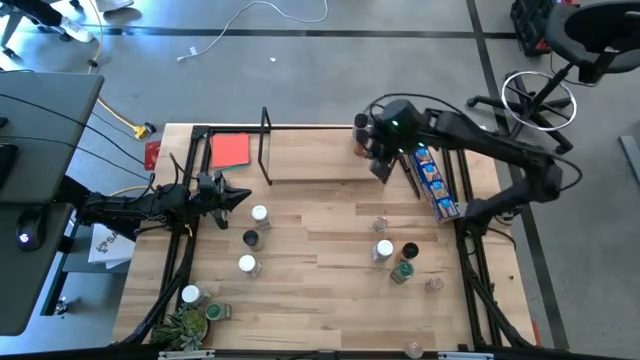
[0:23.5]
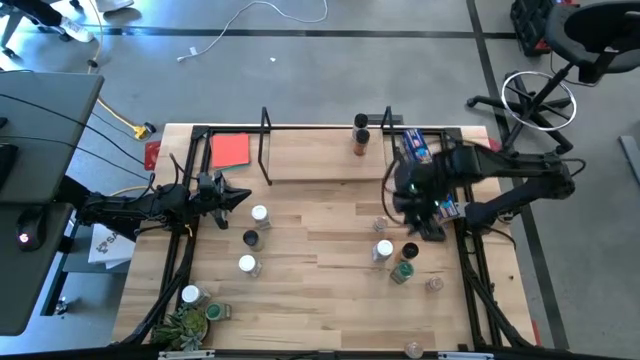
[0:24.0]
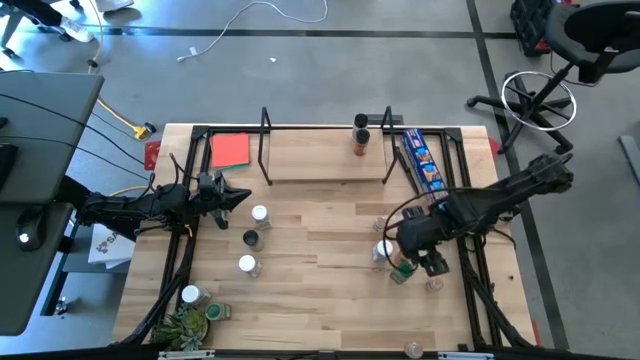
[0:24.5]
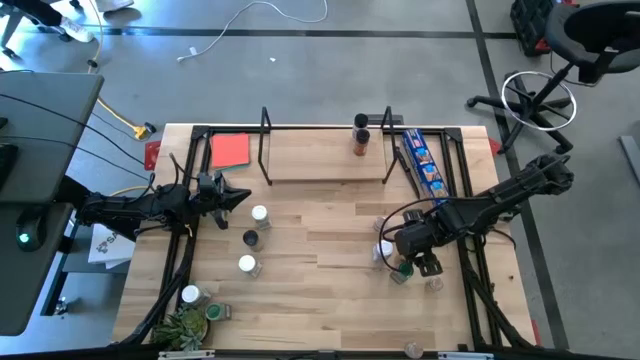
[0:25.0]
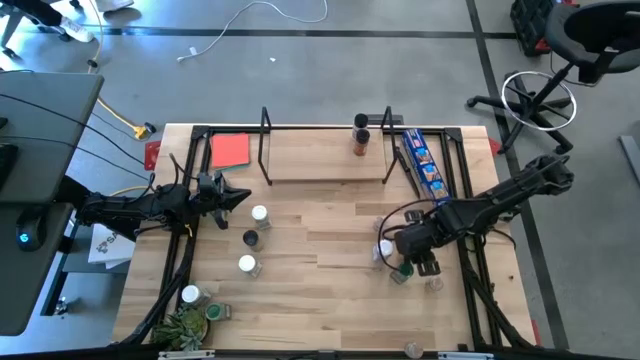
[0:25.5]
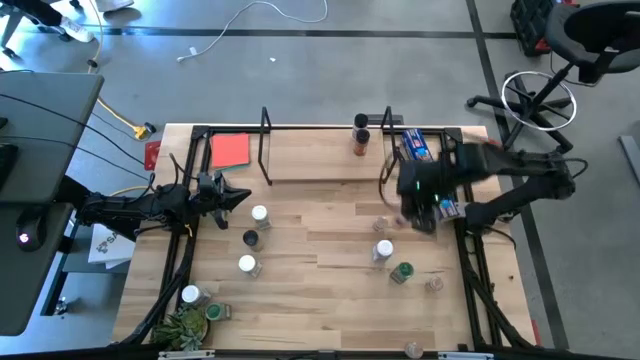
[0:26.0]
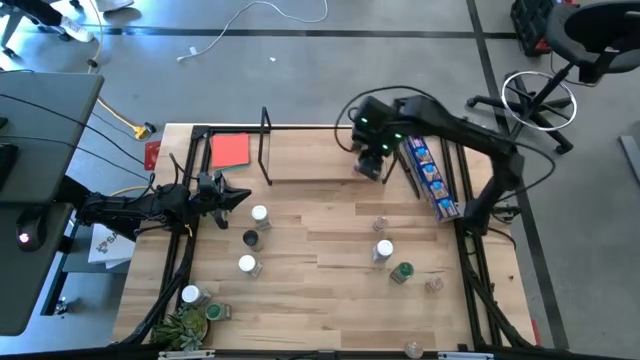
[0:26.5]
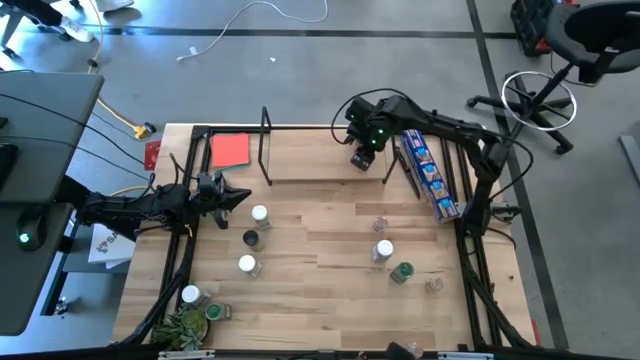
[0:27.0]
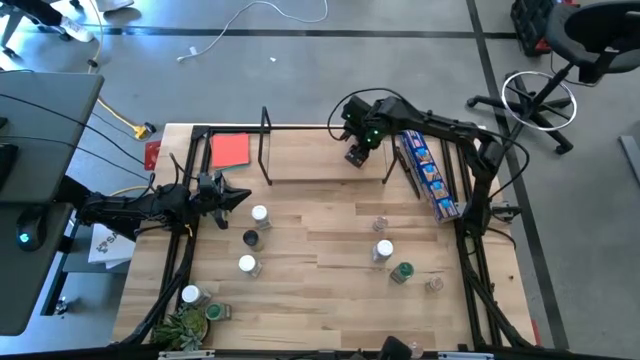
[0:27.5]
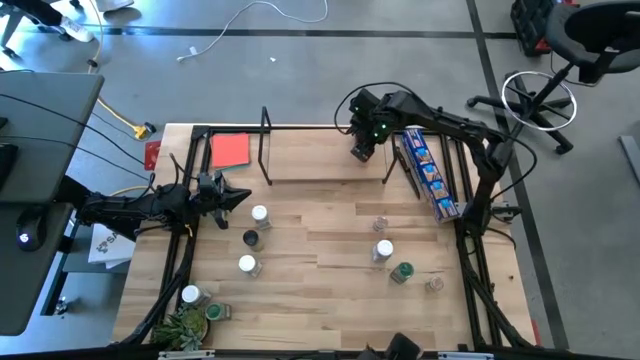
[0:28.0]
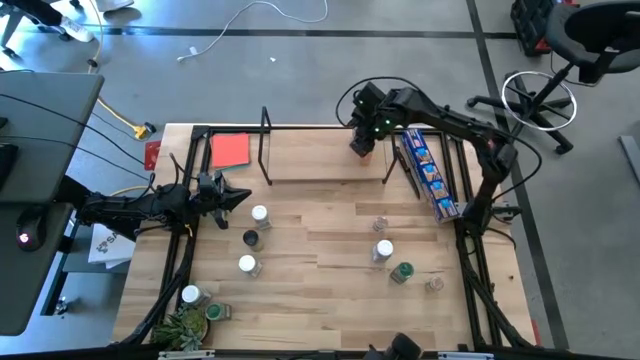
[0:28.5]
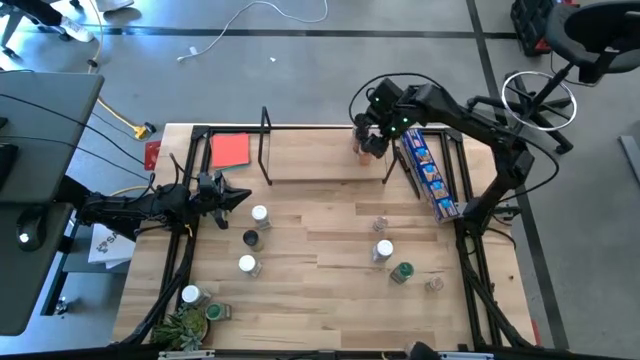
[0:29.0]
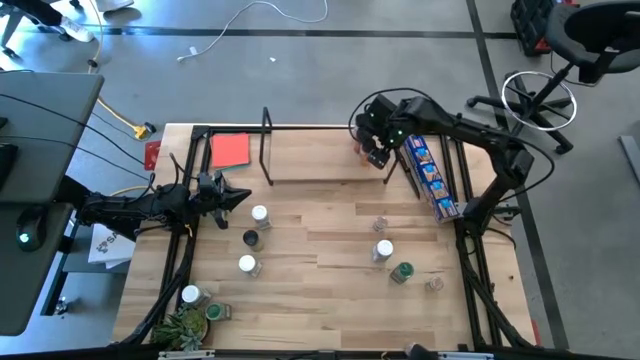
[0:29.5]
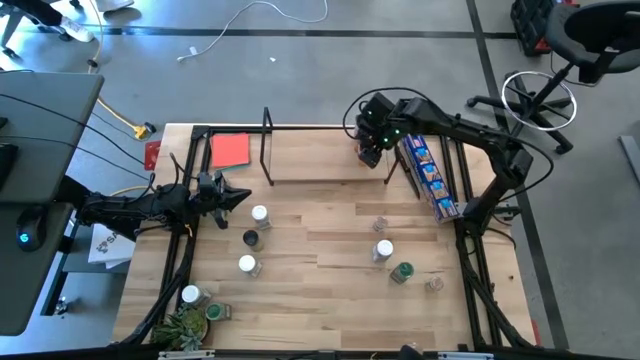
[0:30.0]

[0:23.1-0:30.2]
Task: Shelf spices
Put the right black seasoning bottle aligned with the other black seasoning bottles

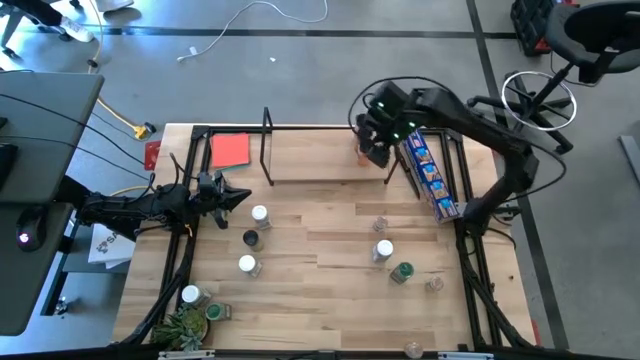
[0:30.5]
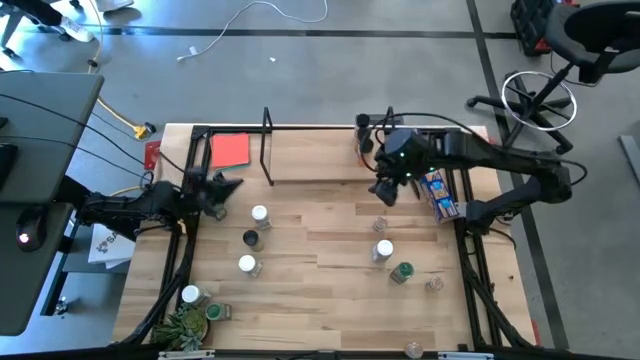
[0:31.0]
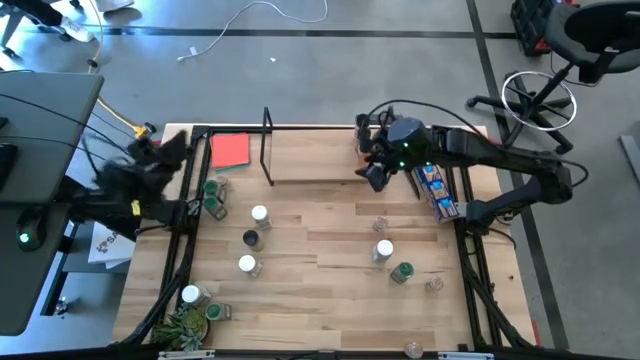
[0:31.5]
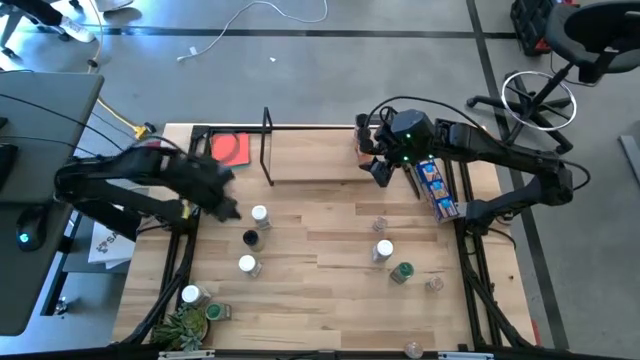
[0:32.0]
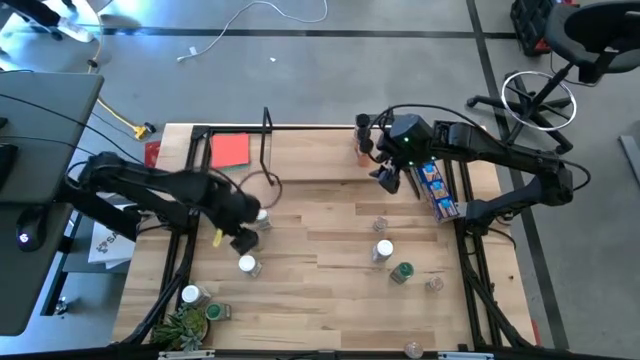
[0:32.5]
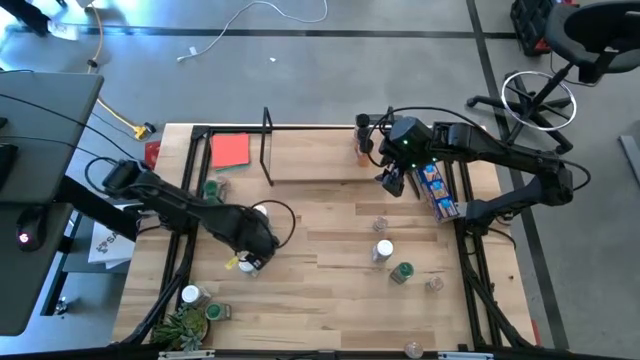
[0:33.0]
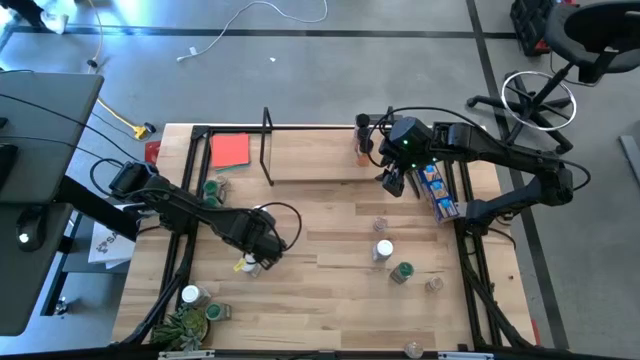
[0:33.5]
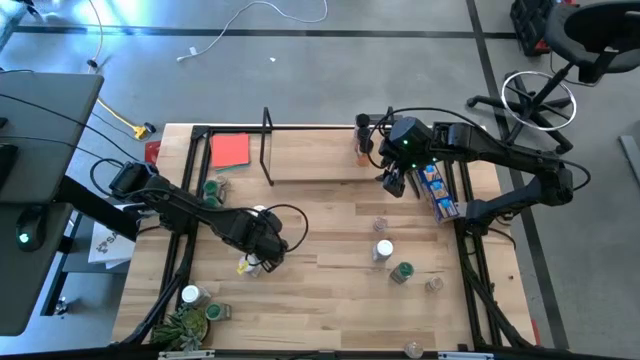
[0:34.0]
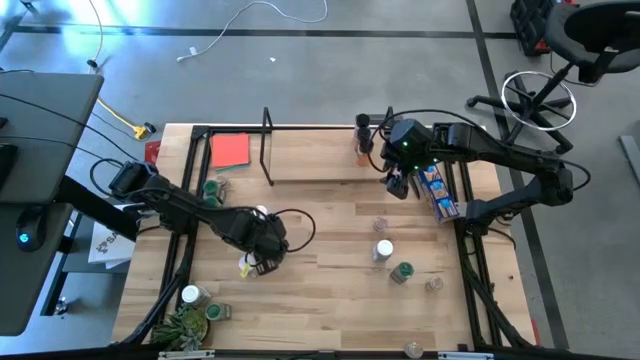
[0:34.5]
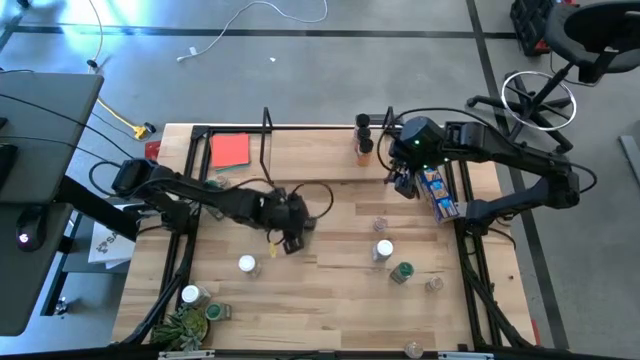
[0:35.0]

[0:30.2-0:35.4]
Put the black seasoning bottle on the shelf aligned with the other black seasoning bottles

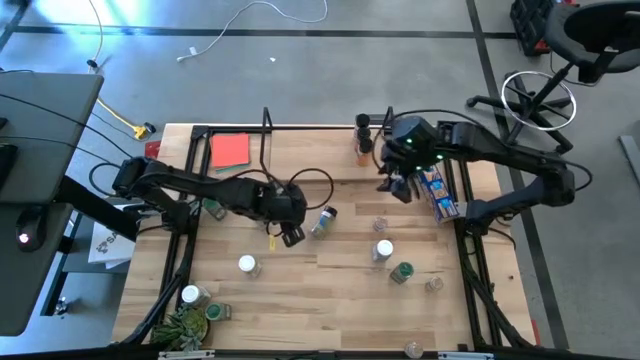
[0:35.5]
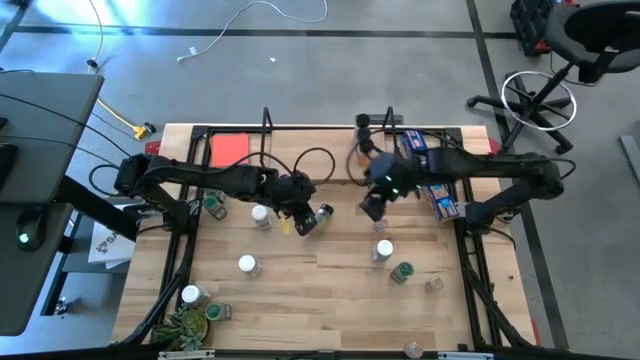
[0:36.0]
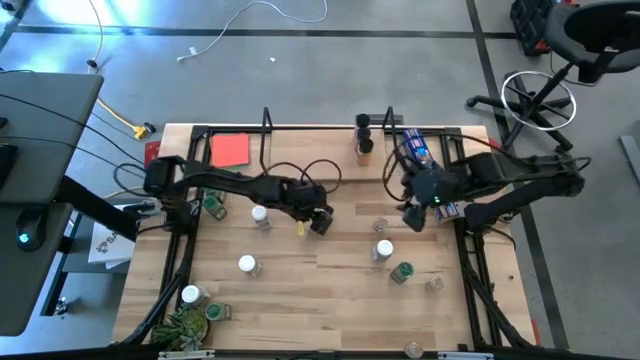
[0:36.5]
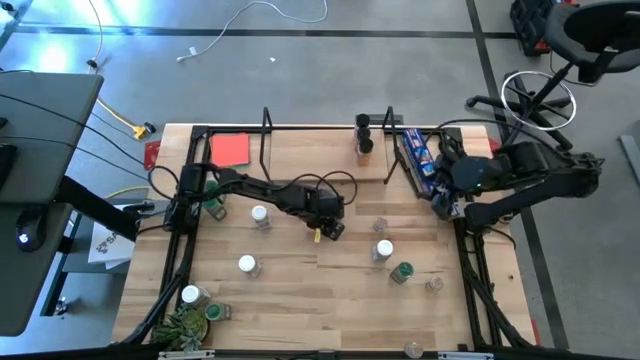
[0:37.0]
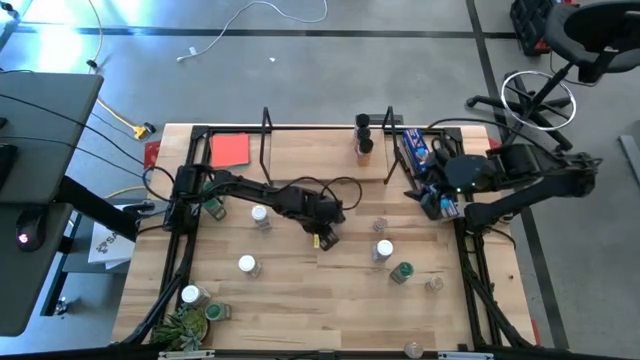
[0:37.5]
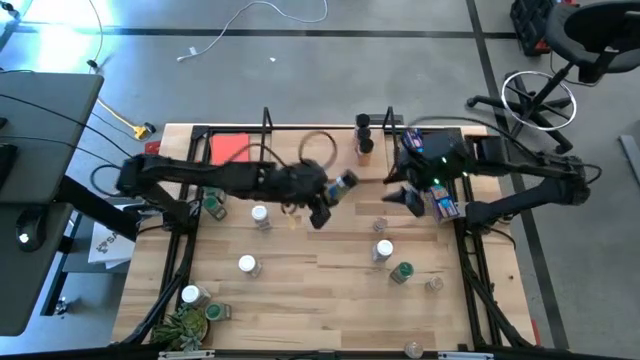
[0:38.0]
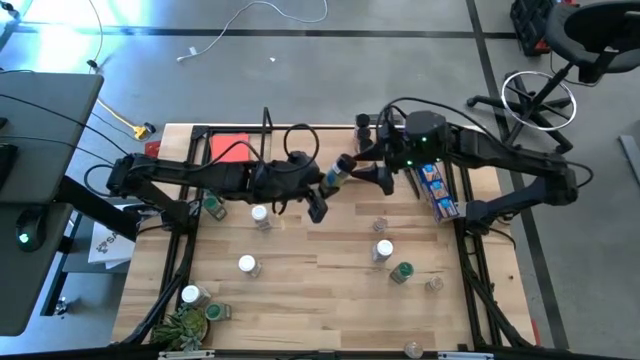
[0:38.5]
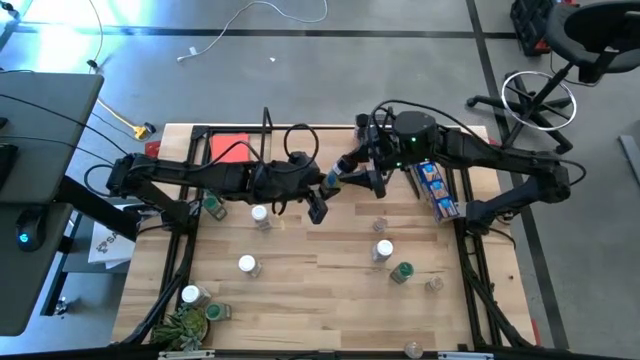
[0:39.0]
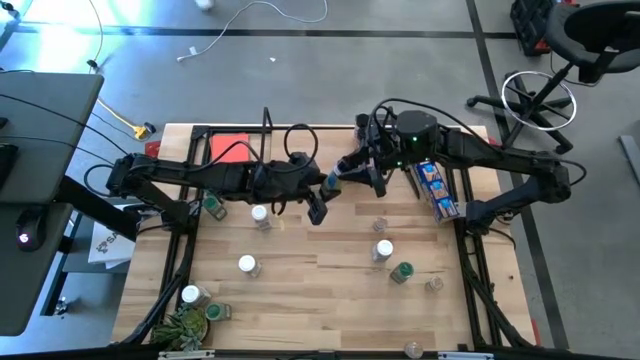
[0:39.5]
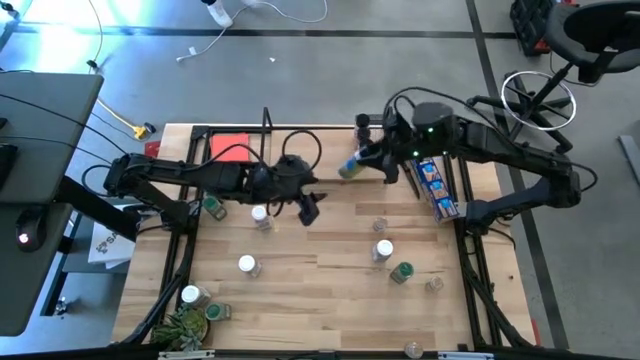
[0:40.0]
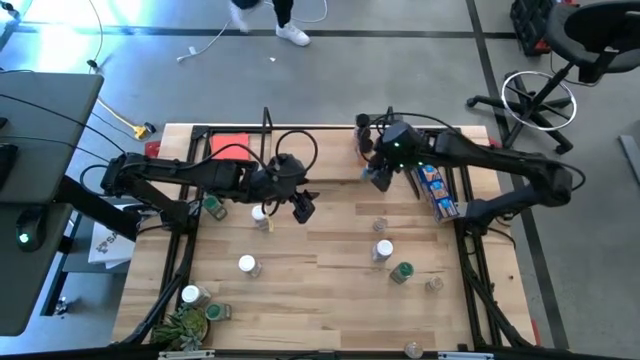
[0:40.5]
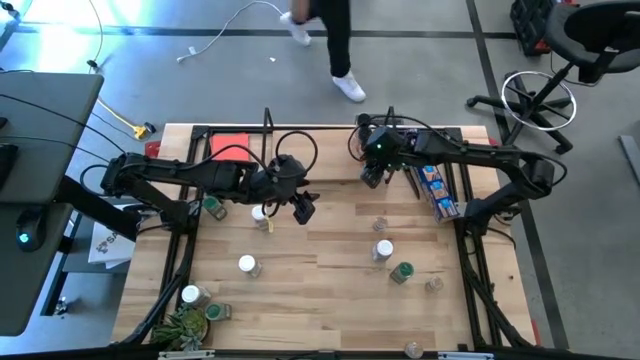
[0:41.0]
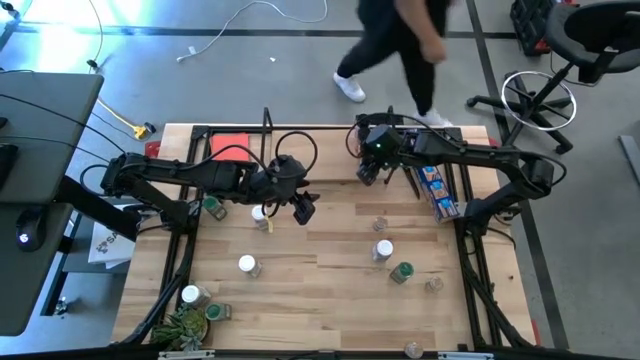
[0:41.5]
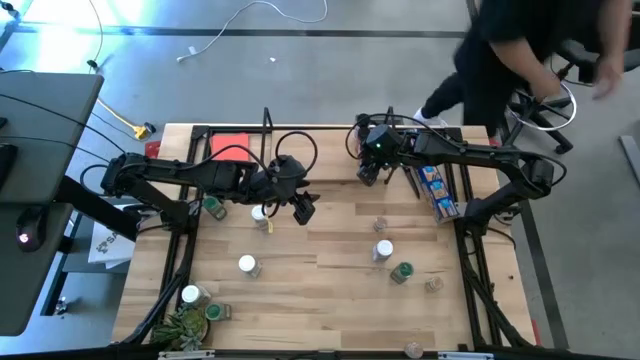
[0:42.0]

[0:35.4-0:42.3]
Put the black seasoning bottle on the shelf aligned with the other black seasoning bottles

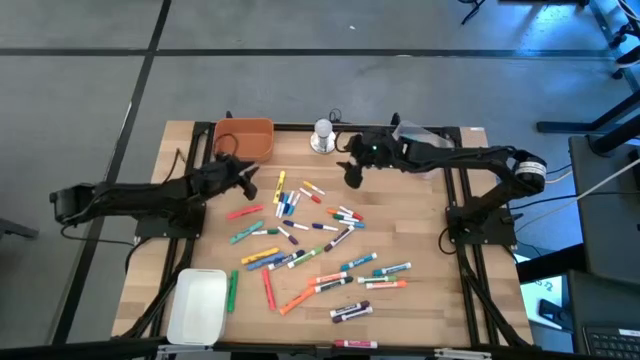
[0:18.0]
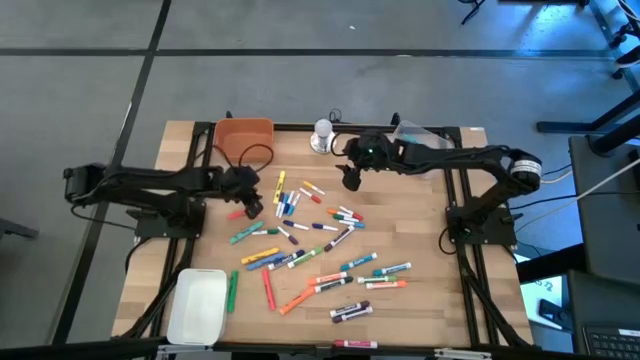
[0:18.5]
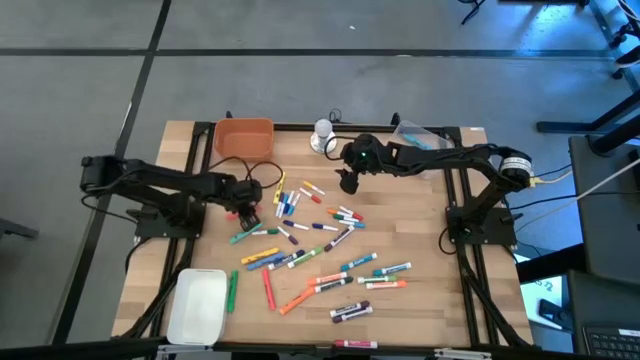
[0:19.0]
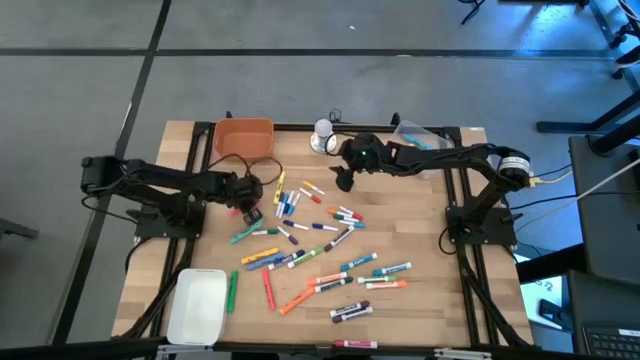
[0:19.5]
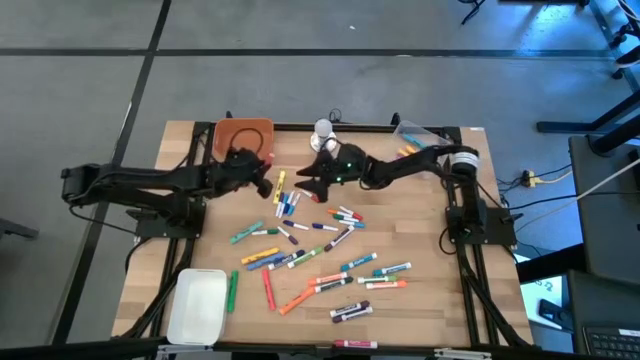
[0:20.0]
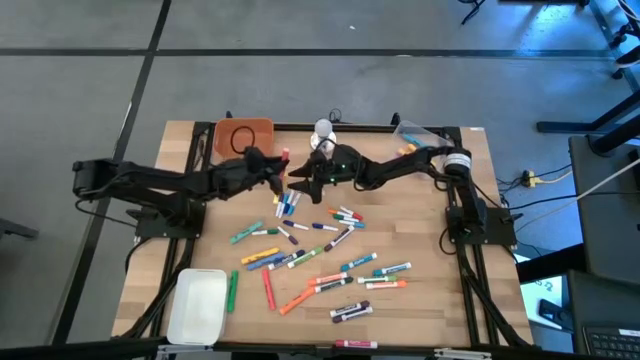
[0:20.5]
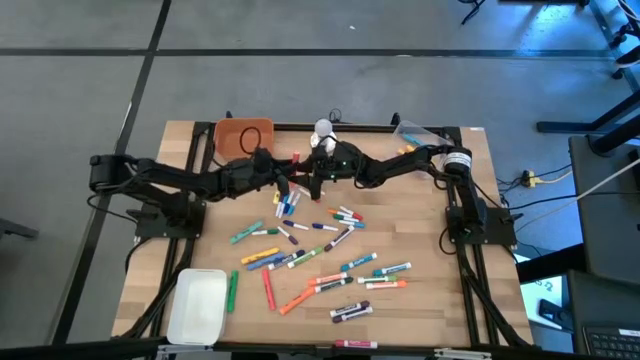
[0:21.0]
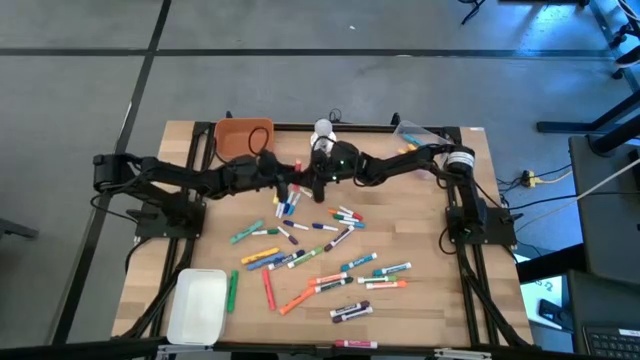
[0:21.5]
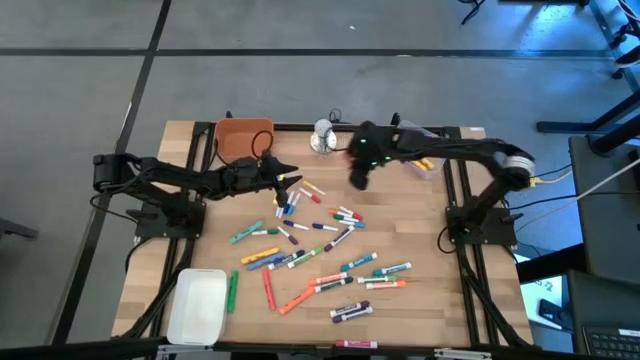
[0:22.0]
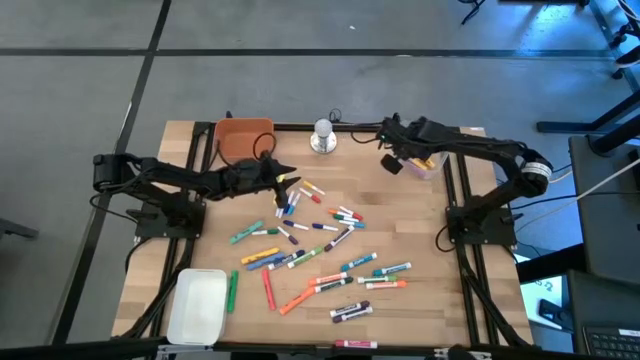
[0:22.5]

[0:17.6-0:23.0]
Task: Pick & Place Markers
Put the large pink highlighter pen into the transparent bin
